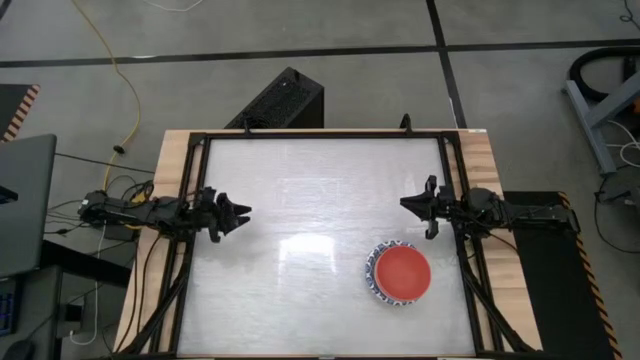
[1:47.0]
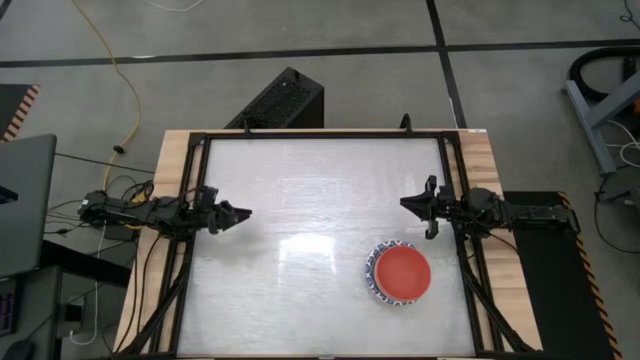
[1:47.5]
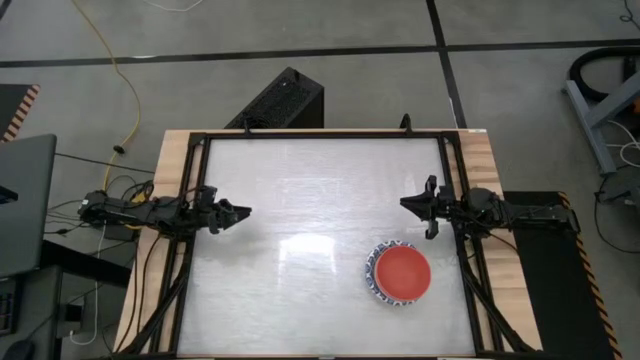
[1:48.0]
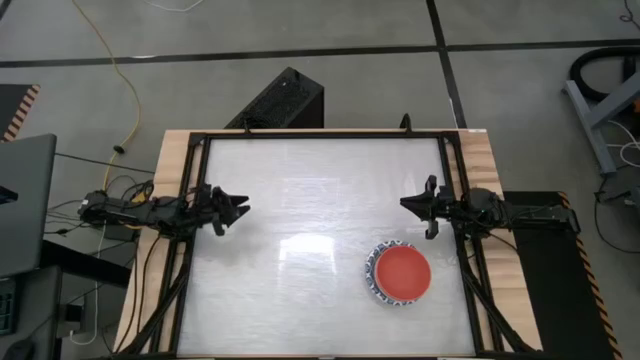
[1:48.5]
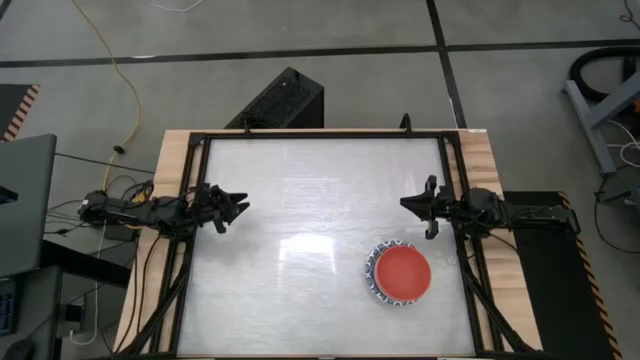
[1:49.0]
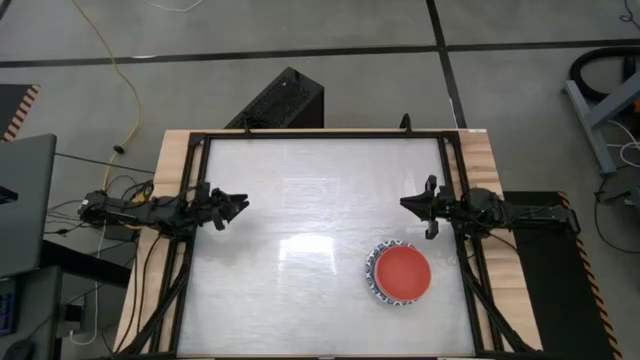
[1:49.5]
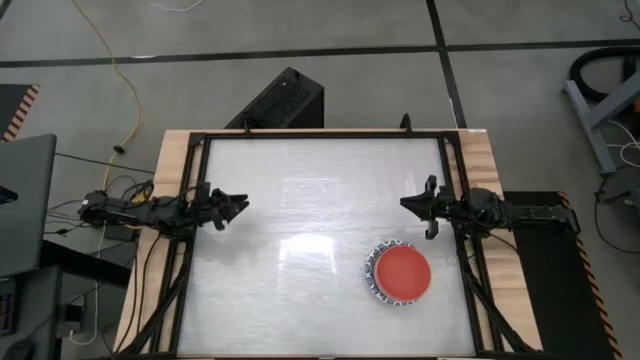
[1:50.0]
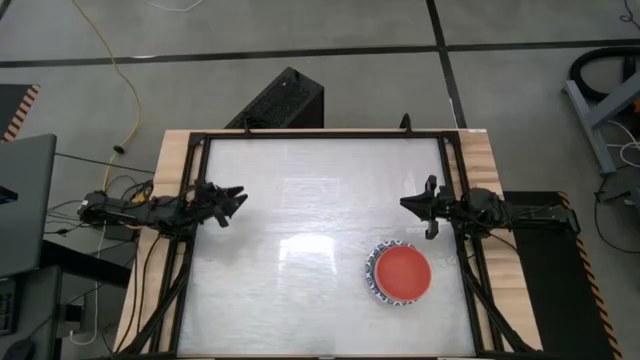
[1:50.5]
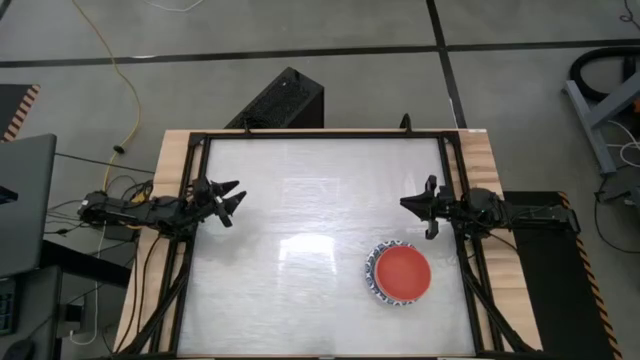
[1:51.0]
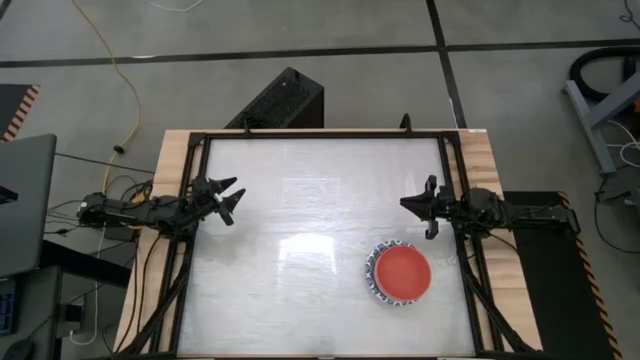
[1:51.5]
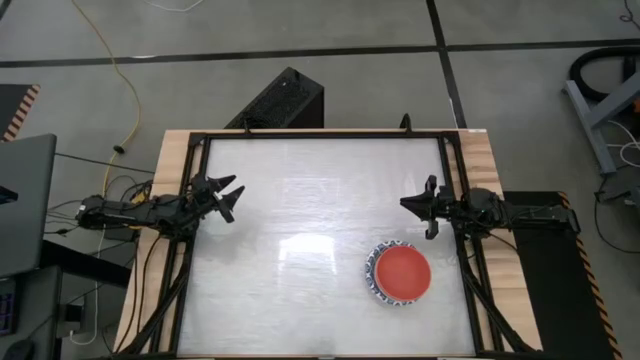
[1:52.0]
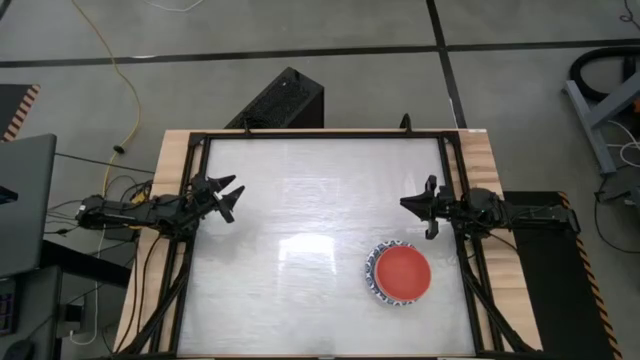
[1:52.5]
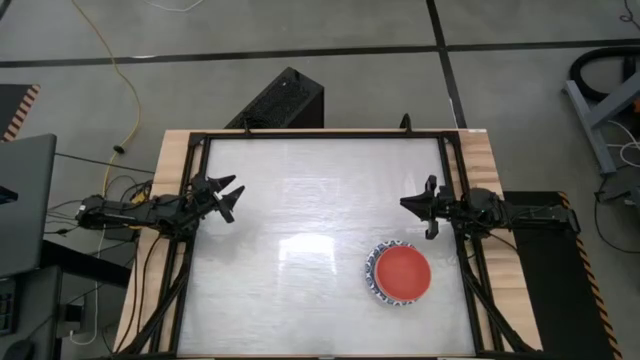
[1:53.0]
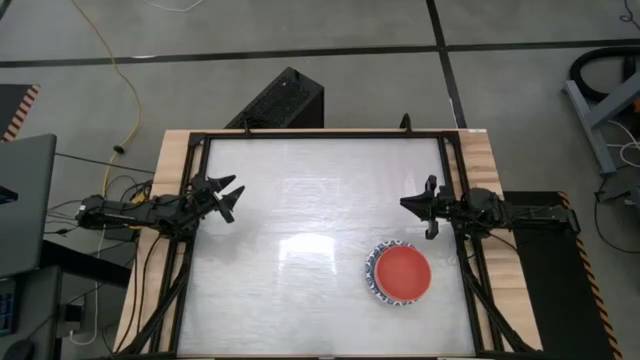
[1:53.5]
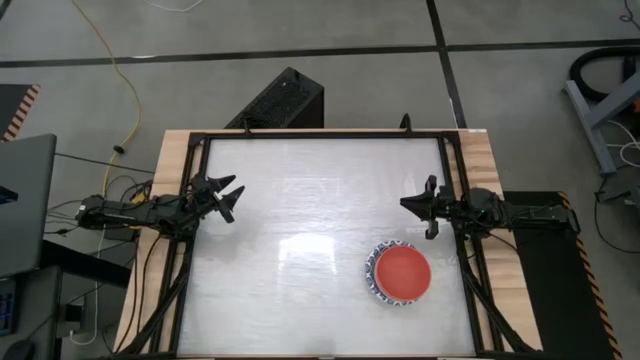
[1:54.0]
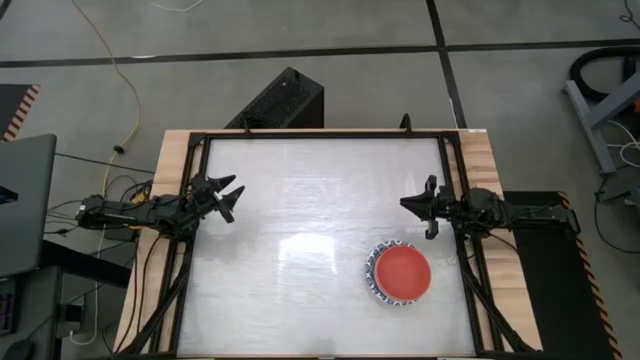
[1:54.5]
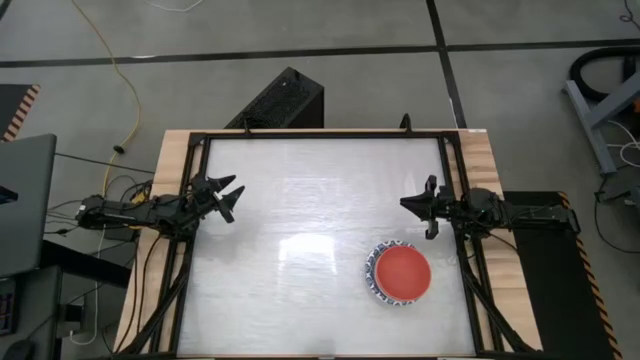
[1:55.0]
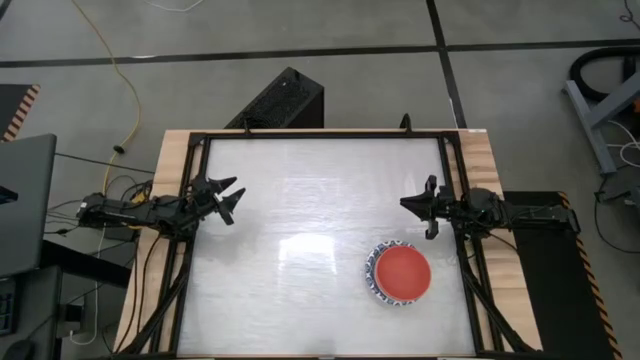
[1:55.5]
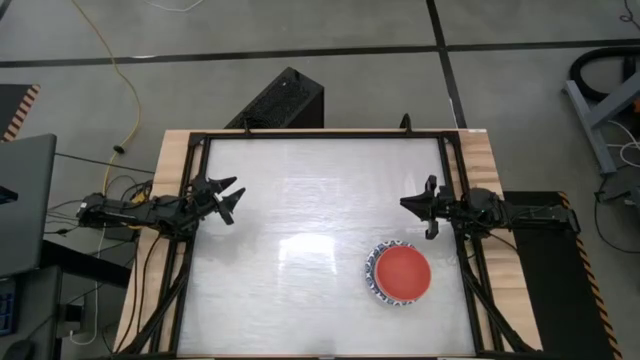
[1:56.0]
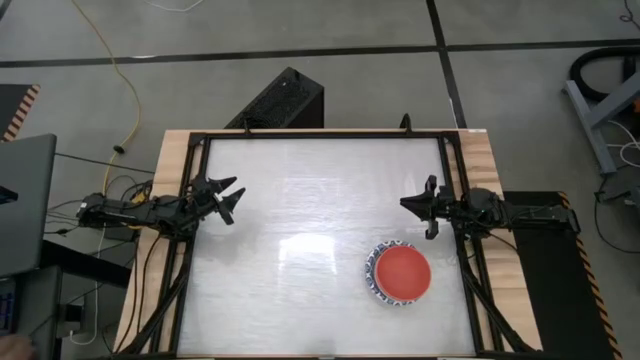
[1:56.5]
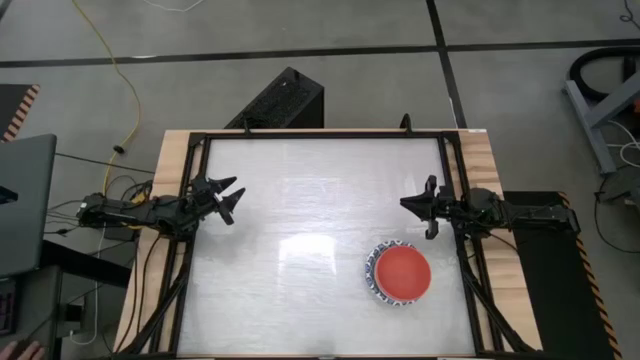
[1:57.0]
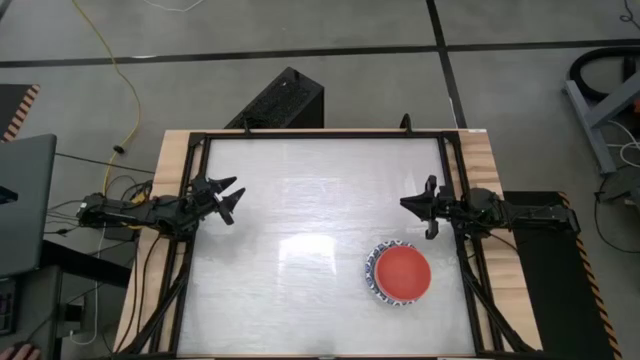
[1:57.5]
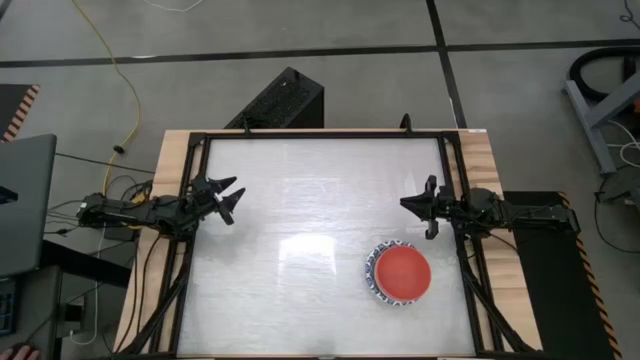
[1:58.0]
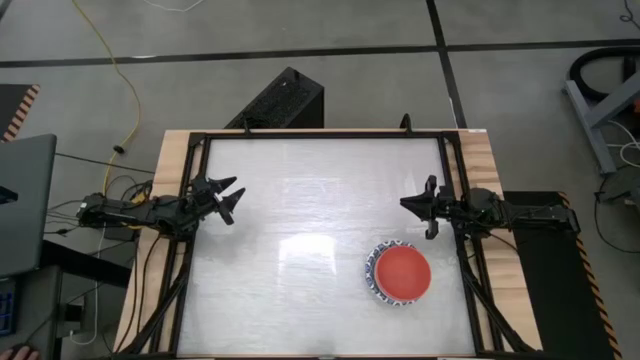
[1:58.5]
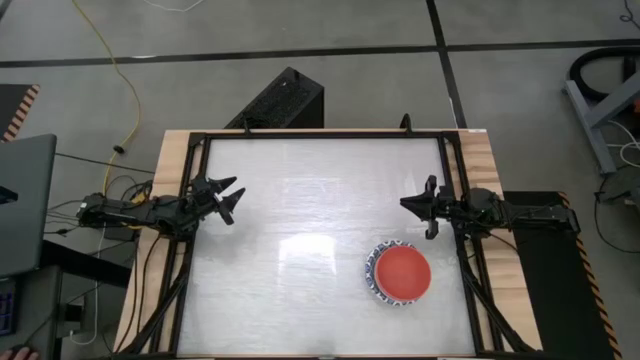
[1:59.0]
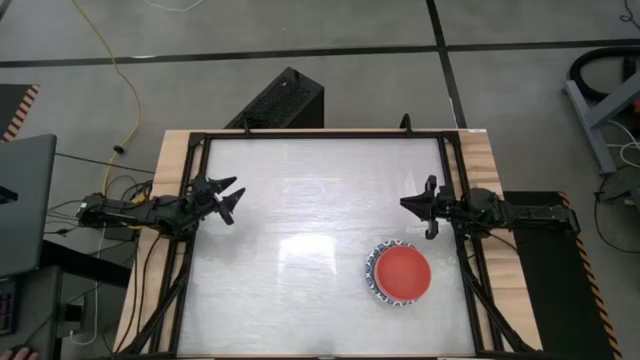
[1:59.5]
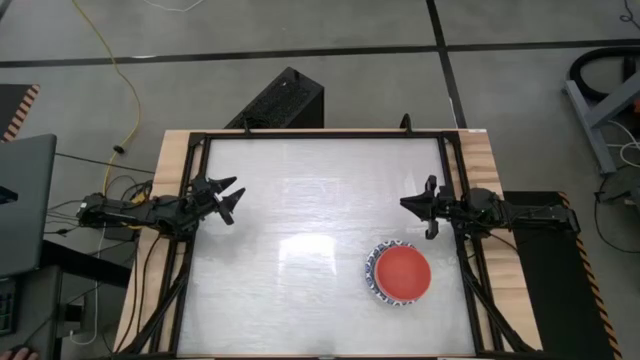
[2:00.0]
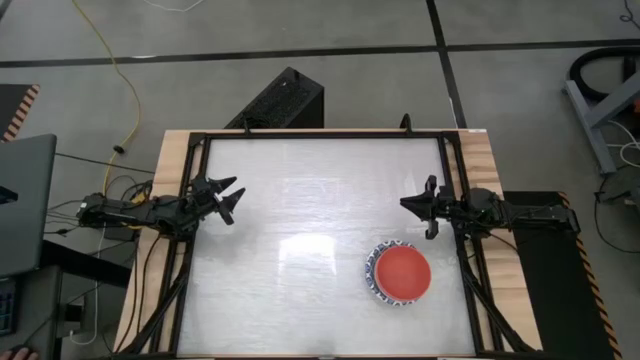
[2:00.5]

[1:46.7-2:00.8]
Task: Nest bowls inside each other by size order
Return to Home Position

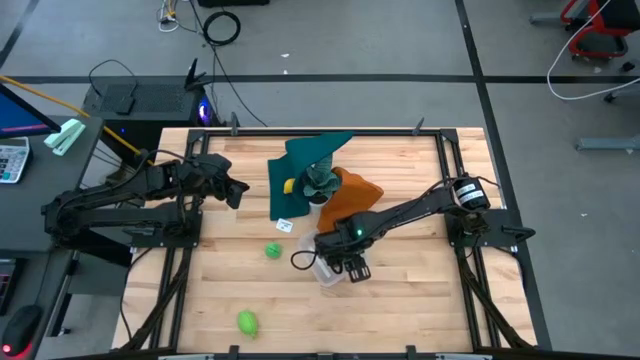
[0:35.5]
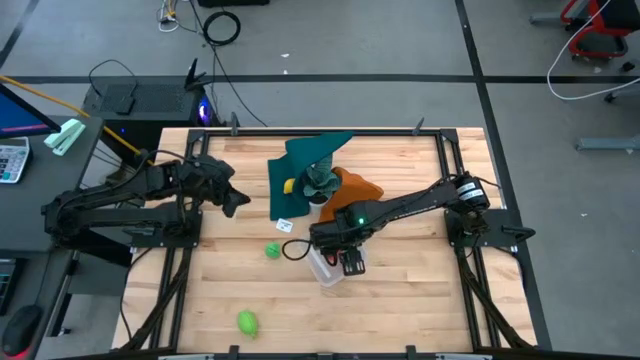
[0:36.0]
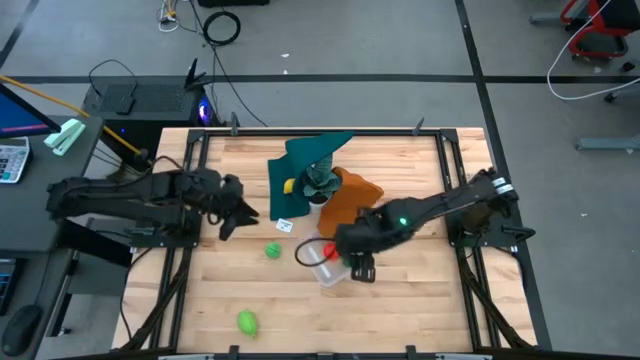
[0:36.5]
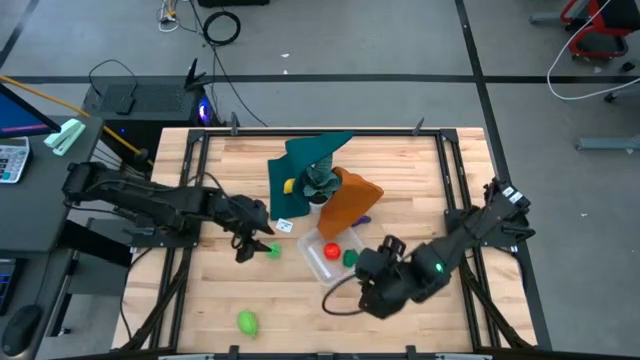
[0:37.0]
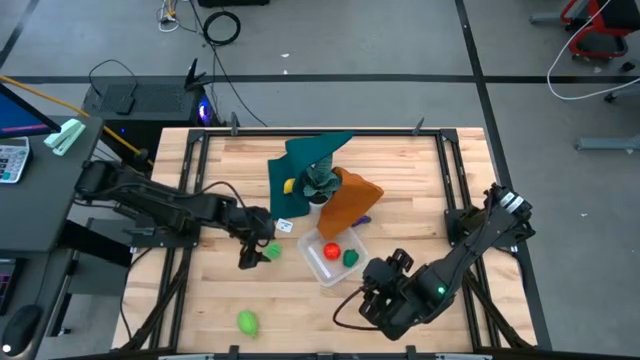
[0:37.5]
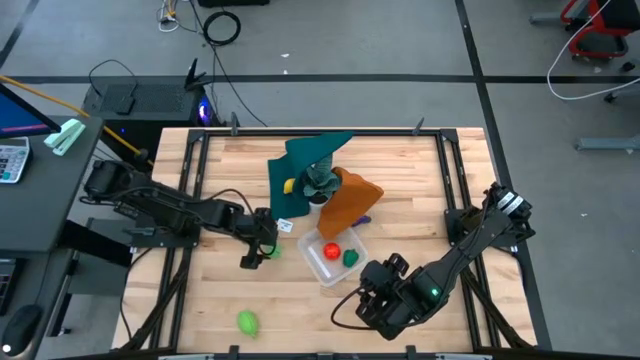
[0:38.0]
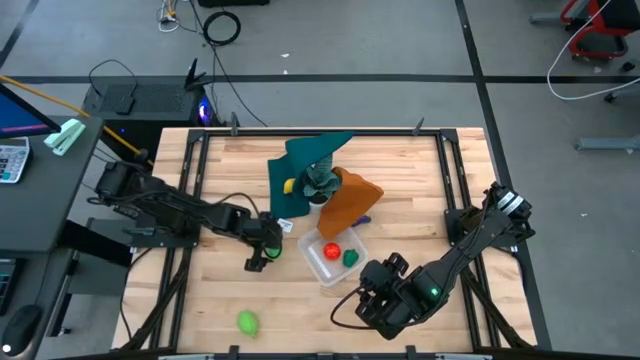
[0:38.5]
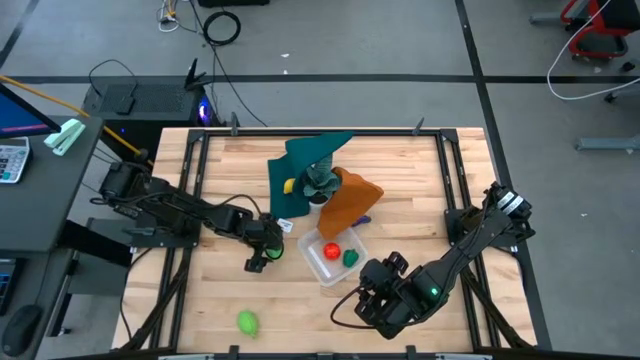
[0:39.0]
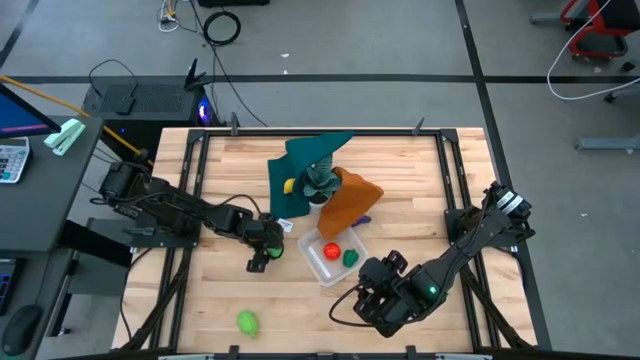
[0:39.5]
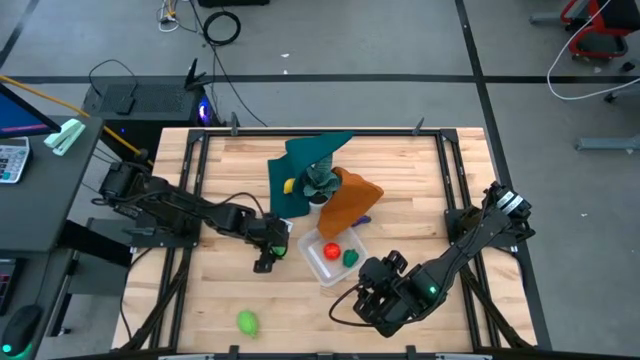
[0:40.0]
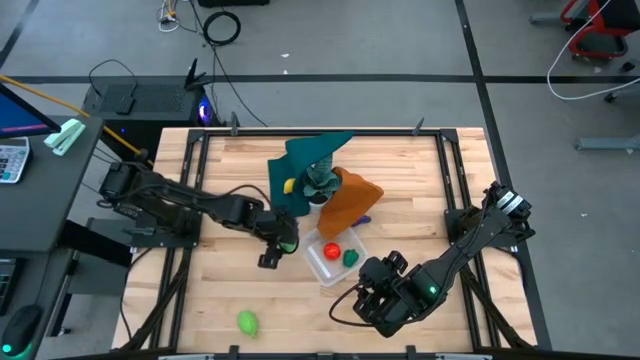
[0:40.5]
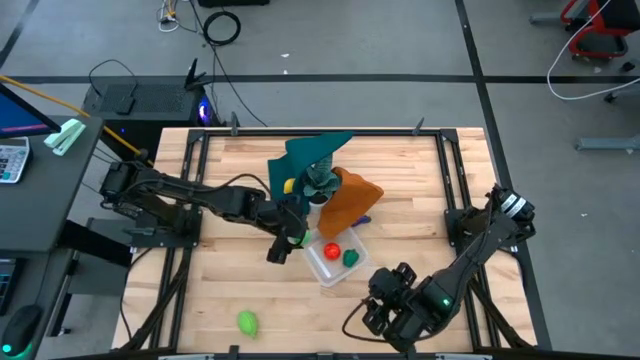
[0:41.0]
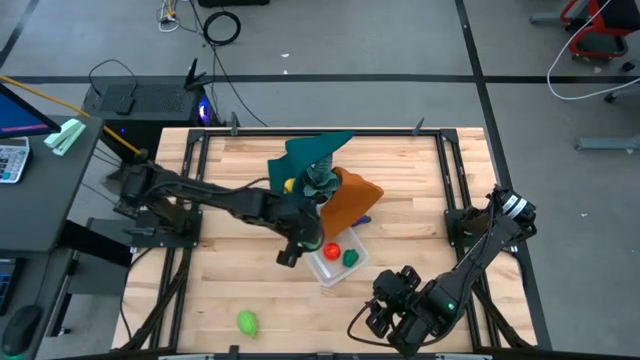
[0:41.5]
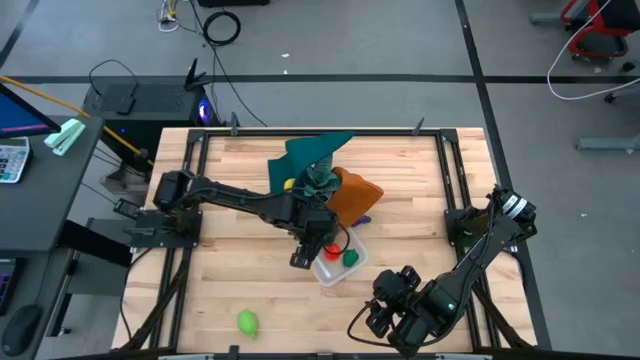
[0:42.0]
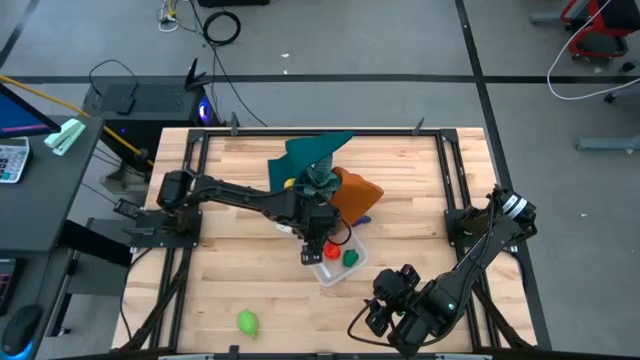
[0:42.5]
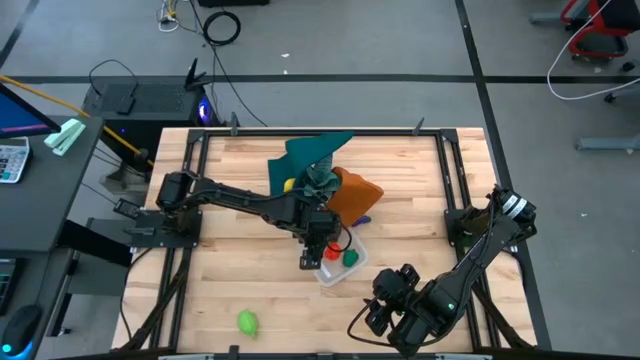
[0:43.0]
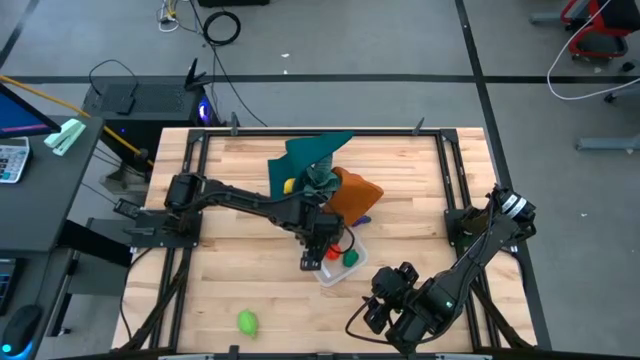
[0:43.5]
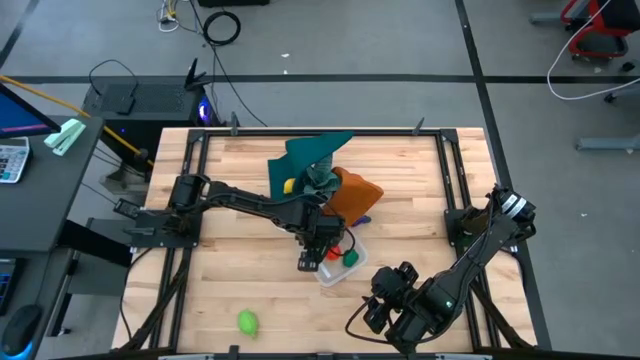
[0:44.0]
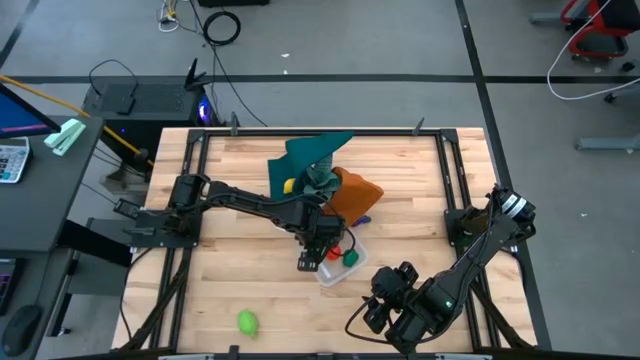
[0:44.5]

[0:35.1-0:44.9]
Task: Pick and placing Produce into tupperware
Put the pear into the transparent bin
